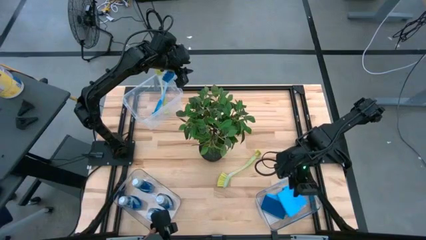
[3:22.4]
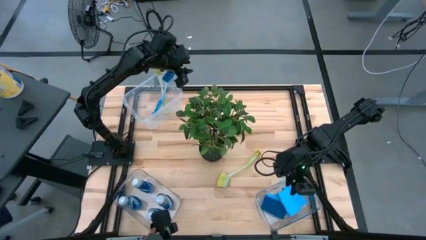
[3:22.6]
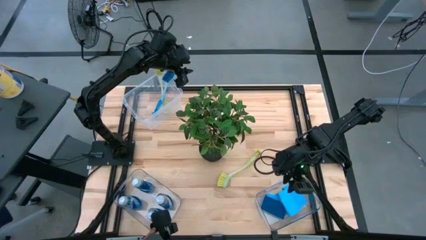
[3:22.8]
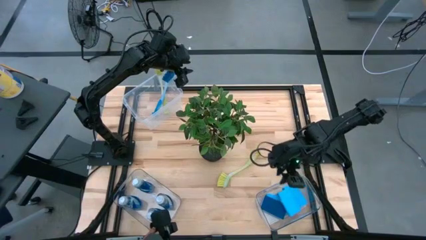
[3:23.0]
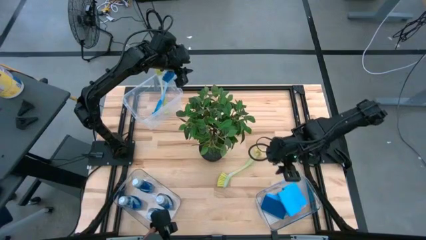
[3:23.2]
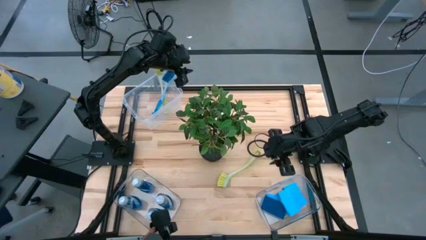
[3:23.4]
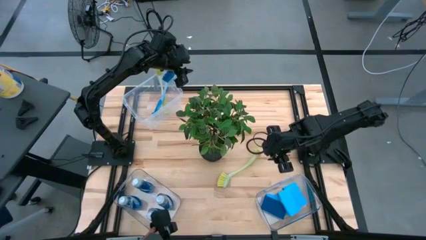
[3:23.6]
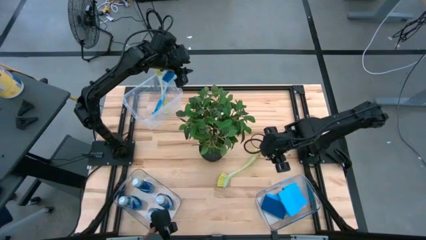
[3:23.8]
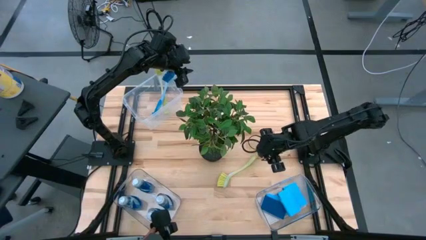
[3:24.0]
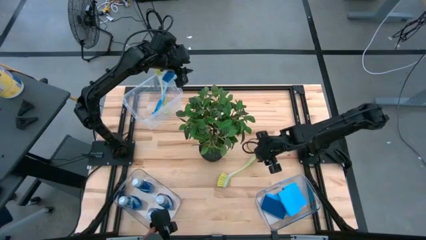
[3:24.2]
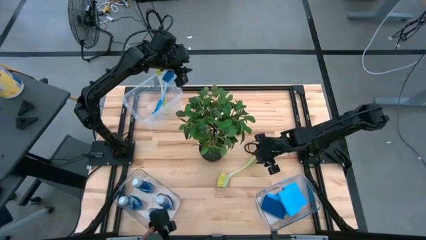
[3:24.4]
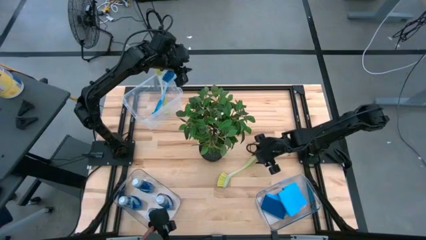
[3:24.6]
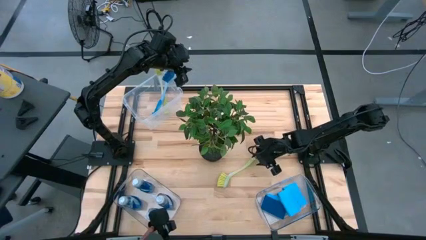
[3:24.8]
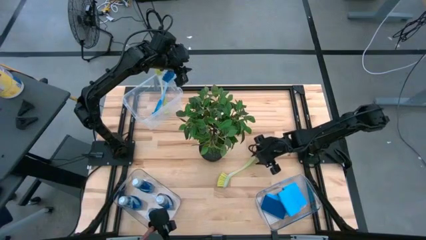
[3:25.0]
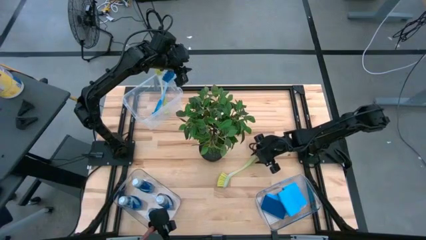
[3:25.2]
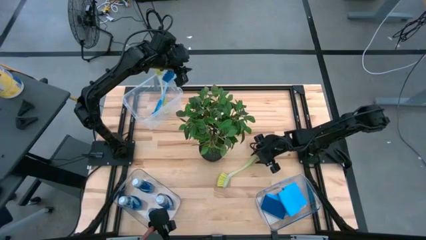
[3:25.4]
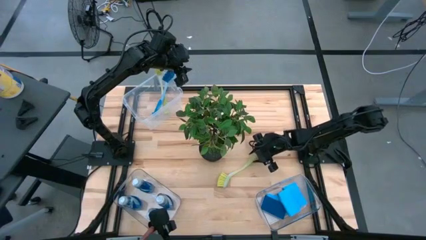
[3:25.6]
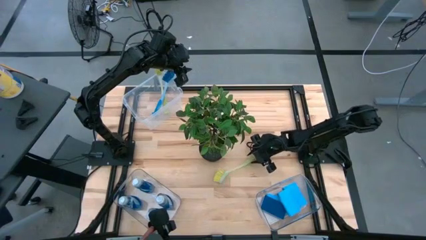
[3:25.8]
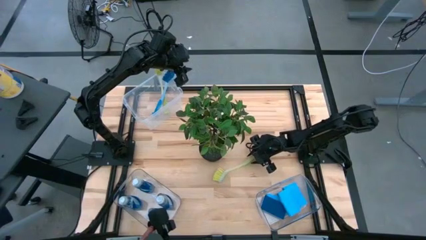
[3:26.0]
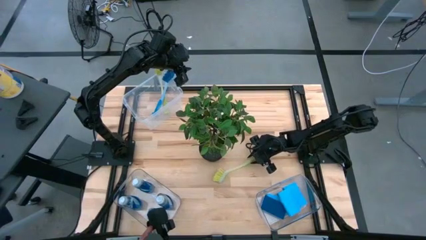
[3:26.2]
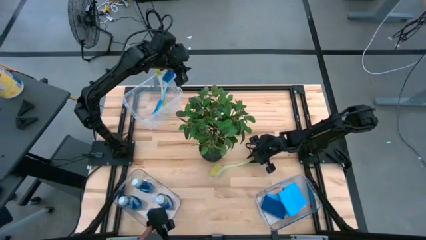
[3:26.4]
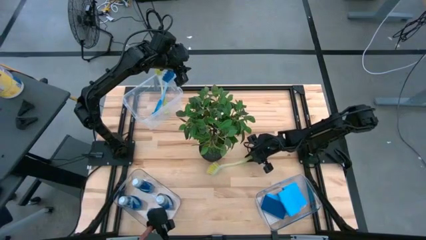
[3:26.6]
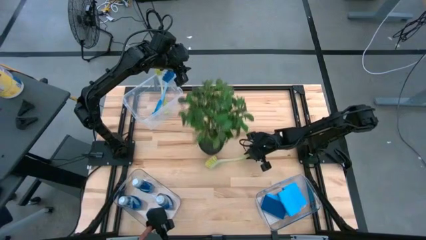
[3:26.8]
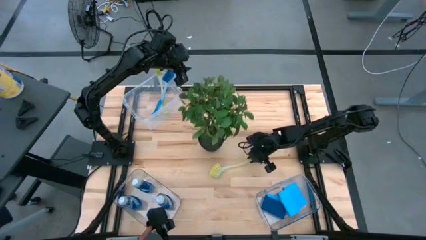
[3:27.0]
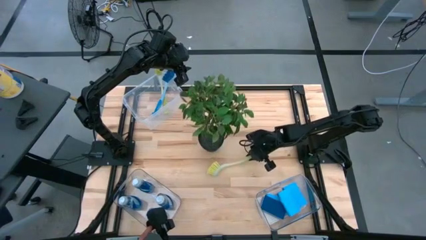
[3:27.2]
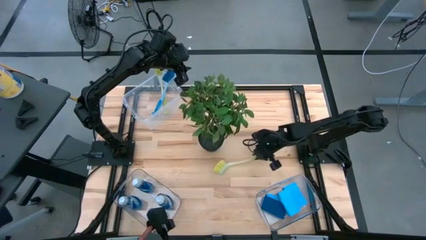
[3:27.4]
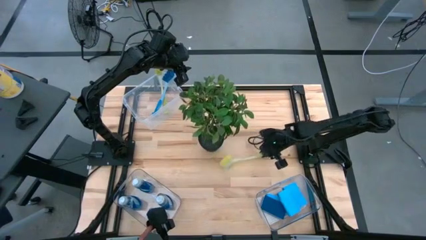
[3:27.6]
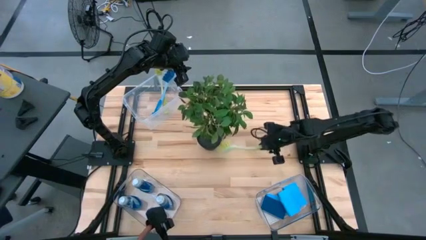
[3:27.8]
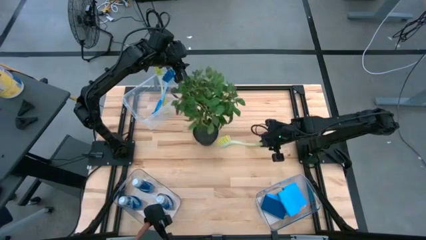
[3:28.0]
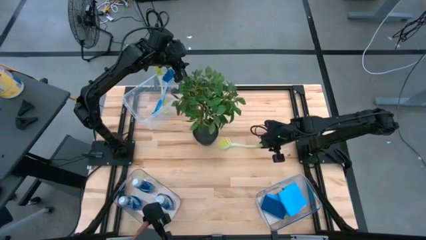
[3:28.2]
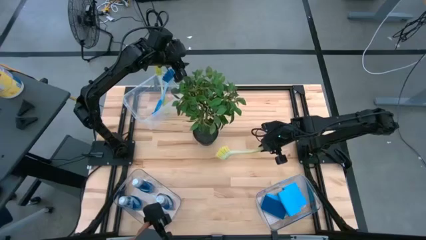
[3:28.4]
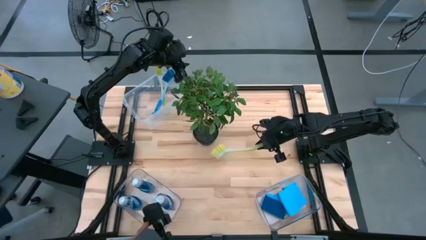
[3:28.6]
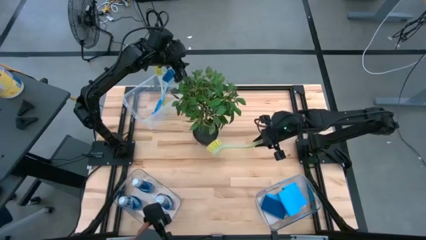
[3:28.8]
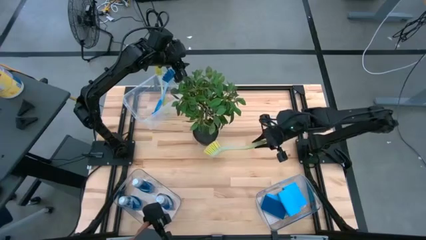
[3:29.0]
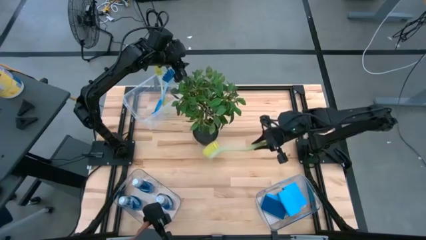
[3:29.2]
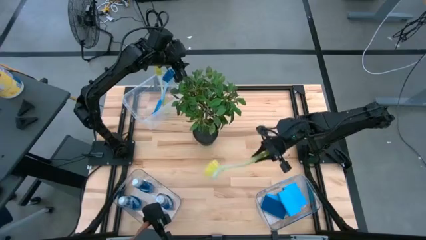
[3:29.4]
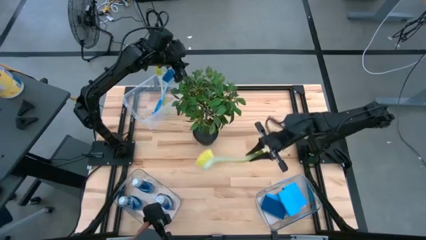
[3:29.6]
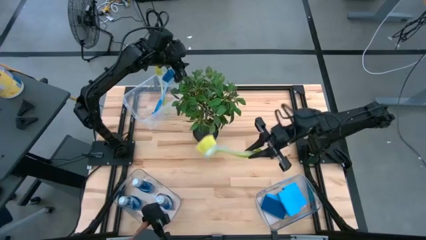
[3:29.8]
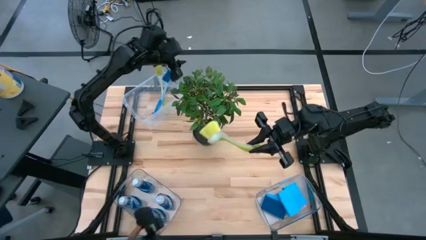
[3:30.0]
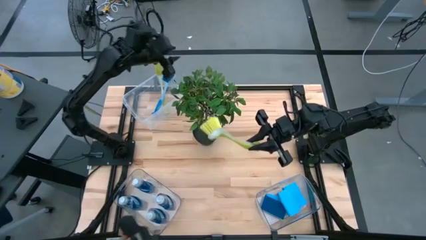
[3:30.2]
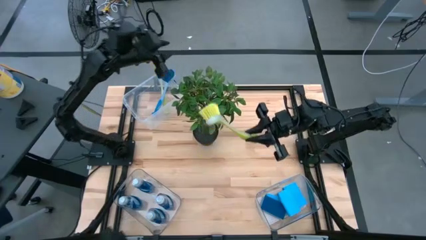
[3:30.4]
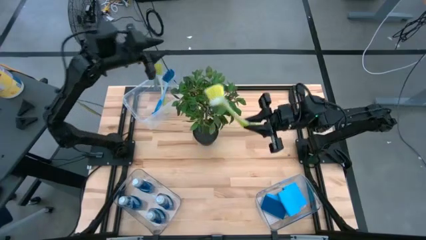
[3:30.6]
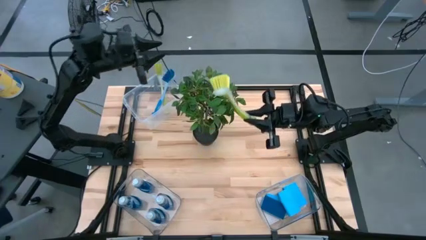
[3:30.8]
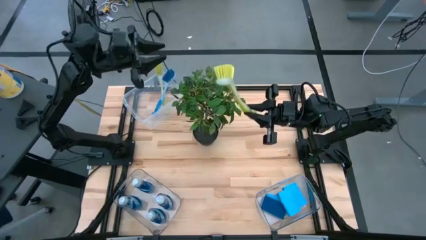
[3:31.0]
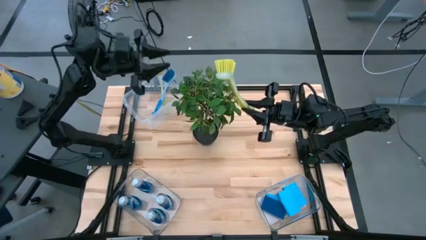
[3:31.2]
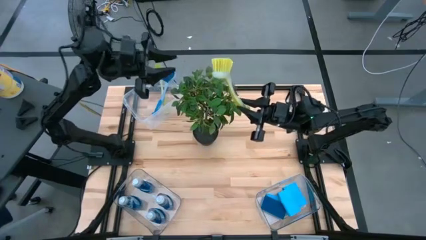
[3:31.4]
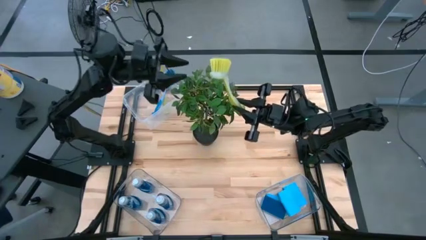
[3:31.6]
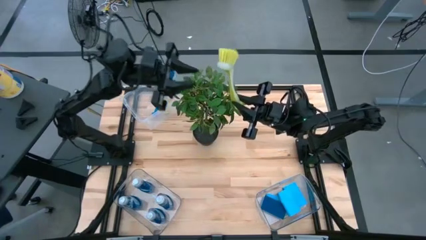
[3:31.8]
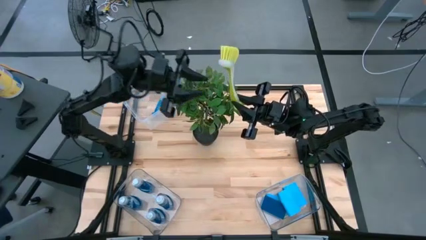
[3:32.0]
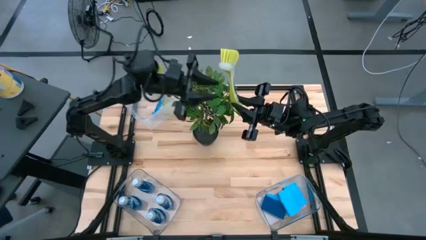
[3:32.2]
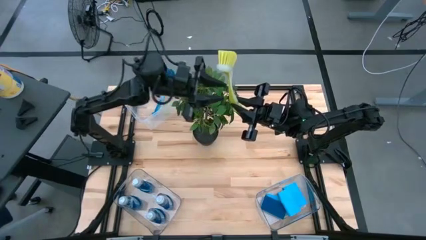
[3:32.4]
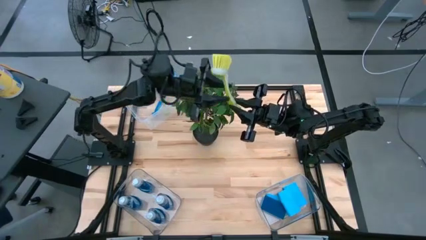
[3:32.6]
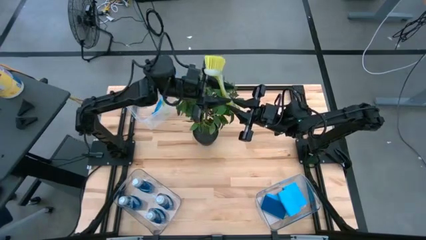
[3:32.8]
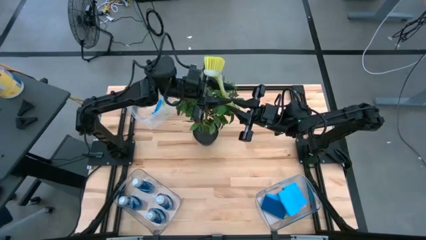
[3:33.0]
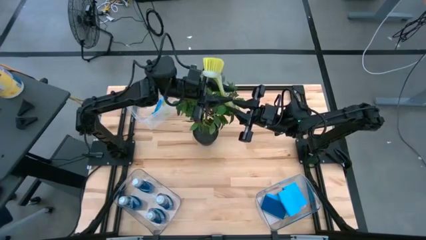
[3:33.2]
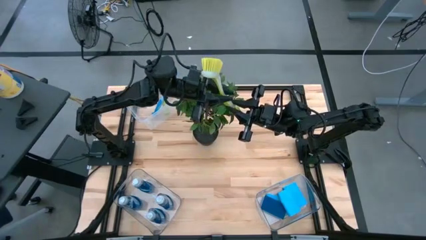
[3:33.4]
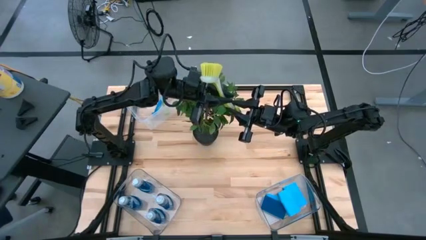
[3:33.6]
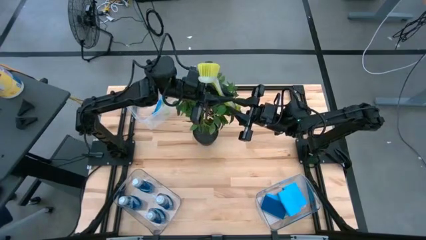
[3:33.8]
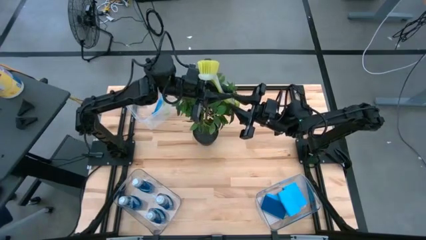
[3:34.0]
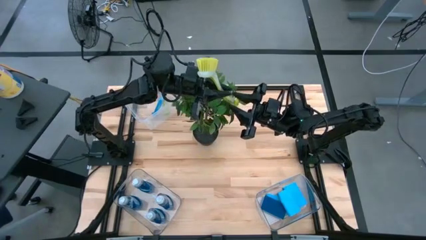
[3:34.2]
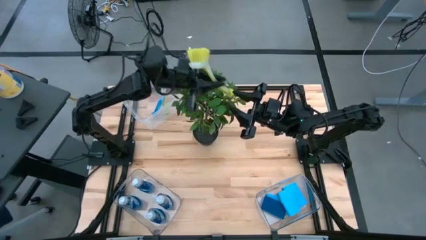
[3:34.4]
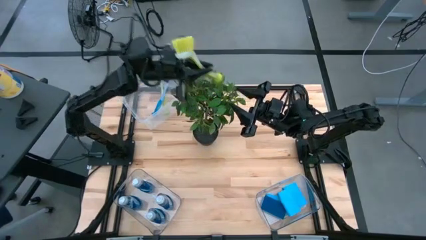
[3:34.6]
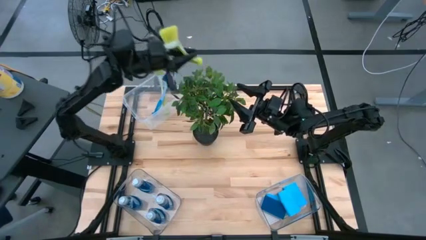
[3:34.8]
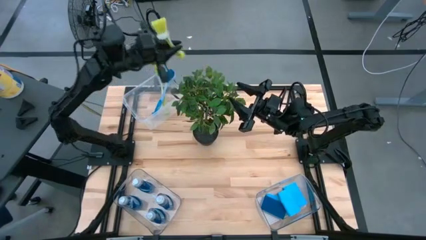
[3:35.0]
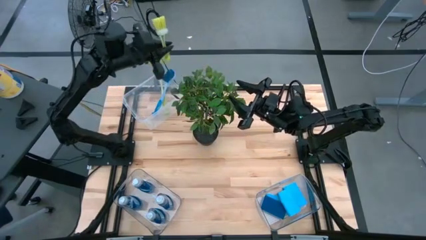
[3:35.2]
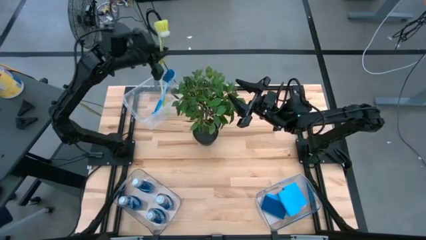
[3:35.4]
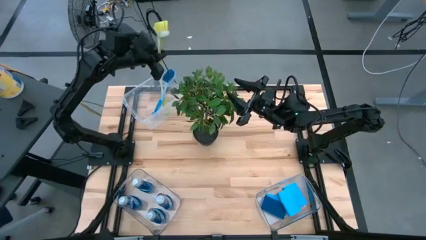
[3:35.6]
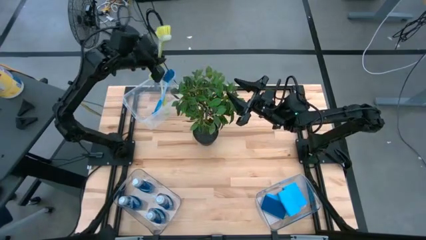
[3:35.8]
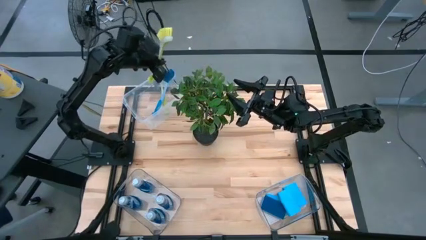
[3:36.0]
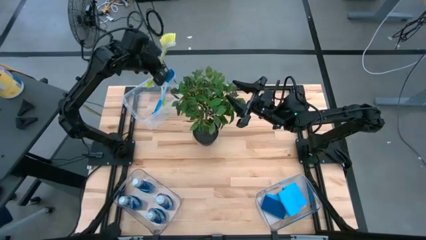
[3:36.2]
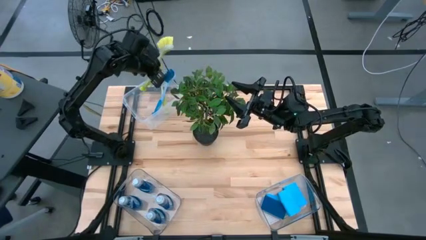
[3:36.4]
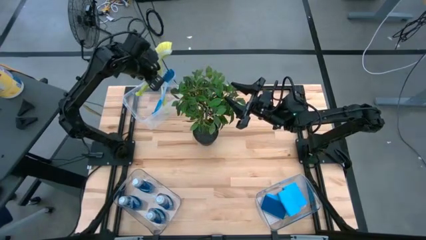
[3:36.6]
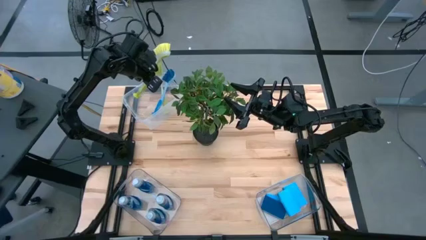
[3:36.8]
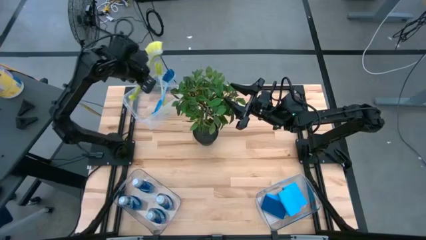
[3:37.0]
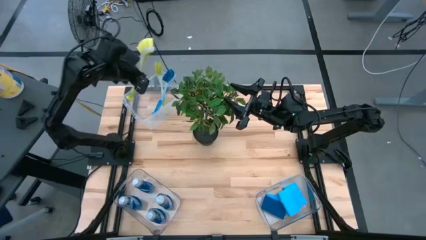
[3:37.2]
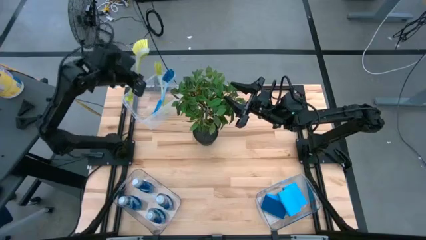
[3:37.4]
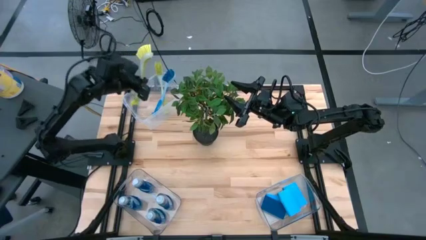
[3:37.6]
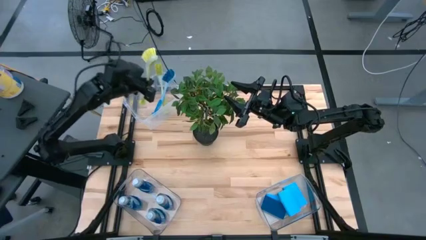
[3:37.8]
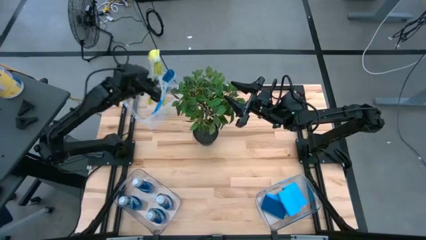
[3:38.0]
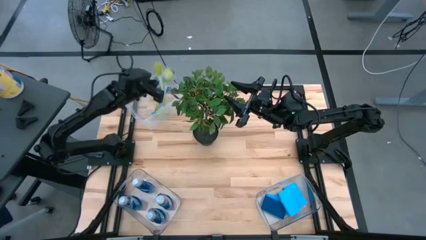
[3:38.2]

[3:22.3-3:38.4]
Task: Pick & Place Kitchen Sink Supplies
Put the green kitchen brush into the top transparent bin
